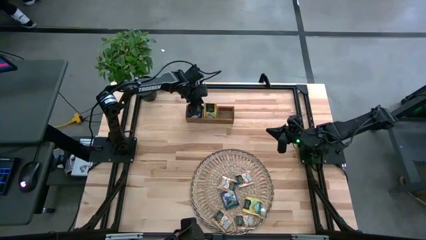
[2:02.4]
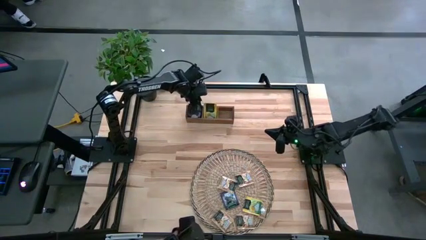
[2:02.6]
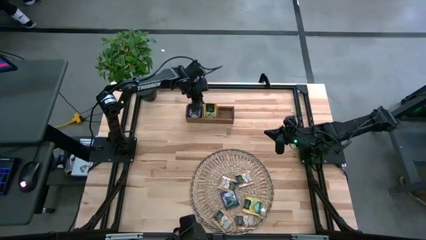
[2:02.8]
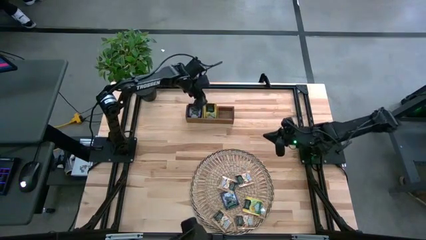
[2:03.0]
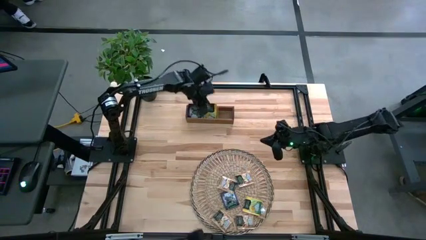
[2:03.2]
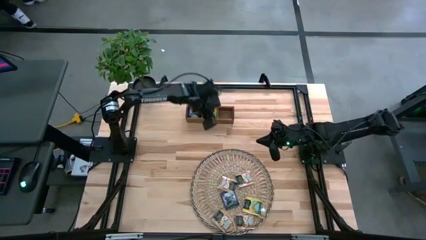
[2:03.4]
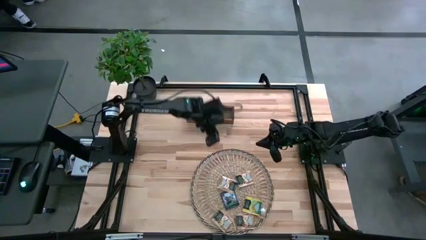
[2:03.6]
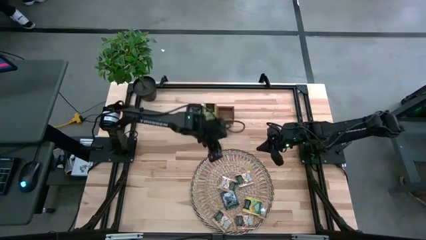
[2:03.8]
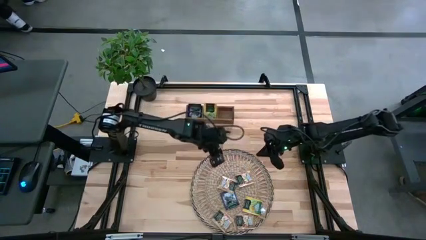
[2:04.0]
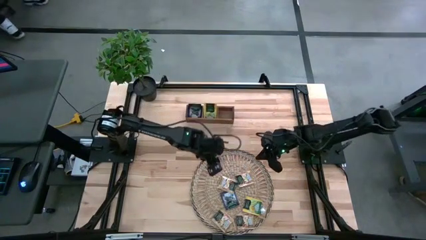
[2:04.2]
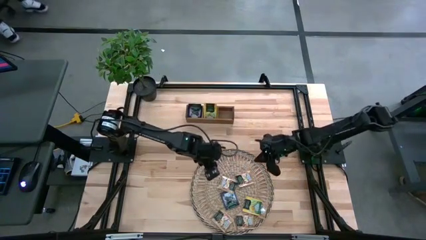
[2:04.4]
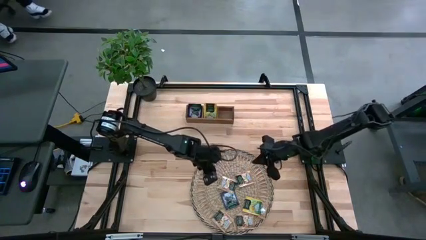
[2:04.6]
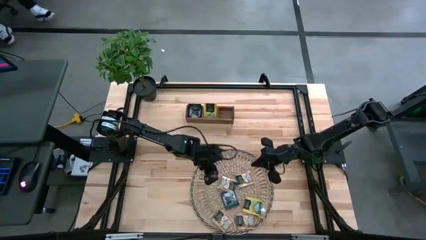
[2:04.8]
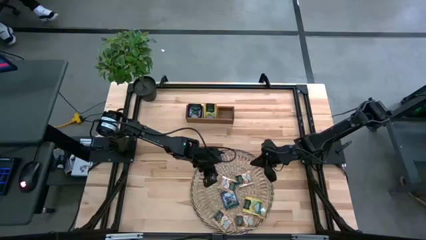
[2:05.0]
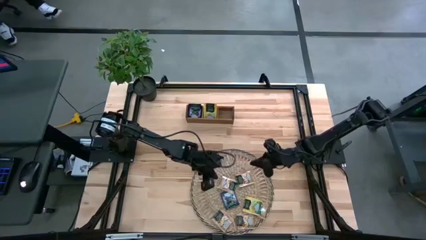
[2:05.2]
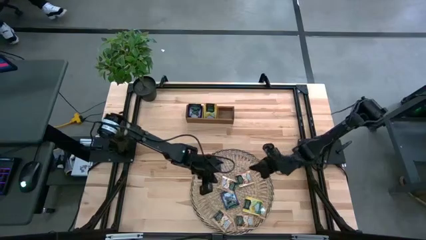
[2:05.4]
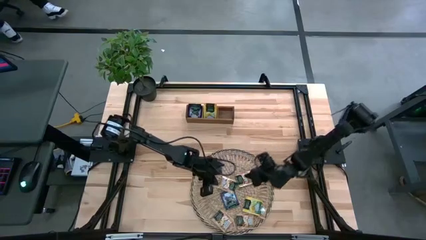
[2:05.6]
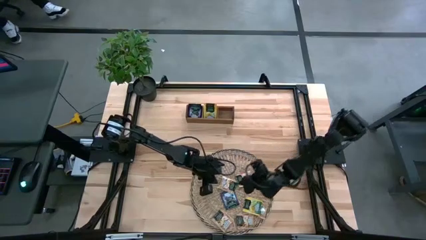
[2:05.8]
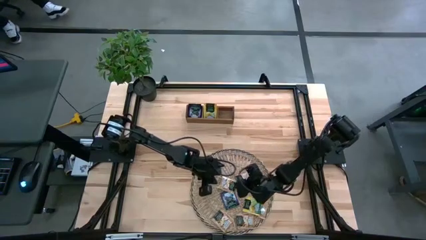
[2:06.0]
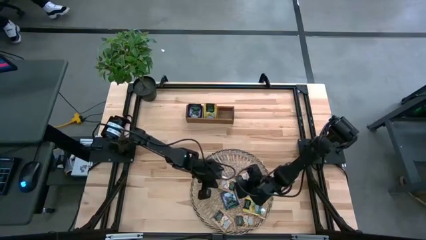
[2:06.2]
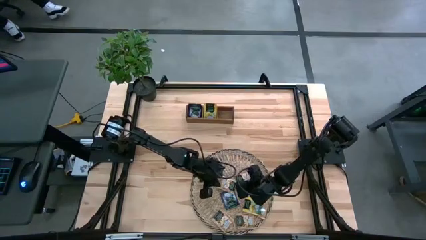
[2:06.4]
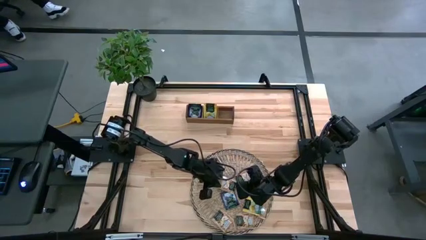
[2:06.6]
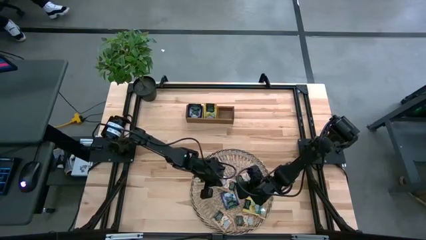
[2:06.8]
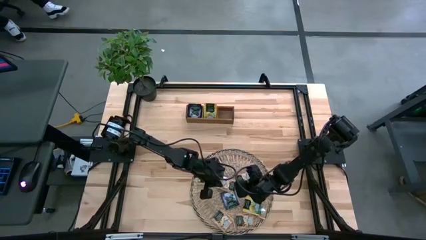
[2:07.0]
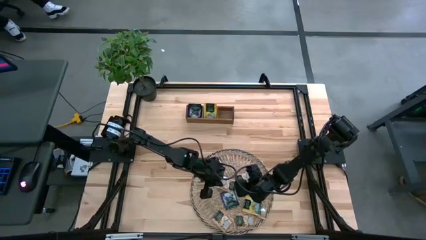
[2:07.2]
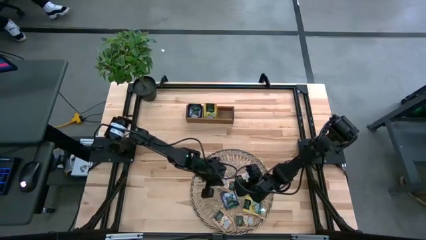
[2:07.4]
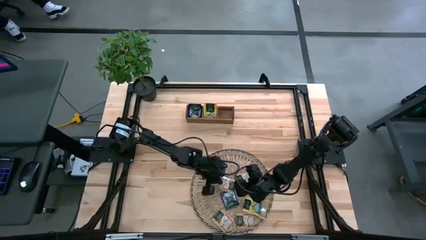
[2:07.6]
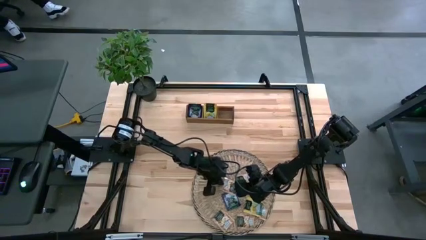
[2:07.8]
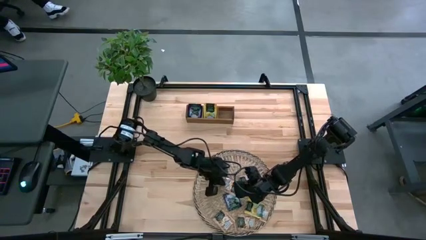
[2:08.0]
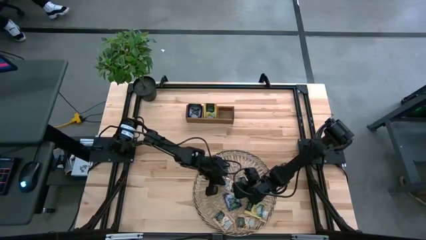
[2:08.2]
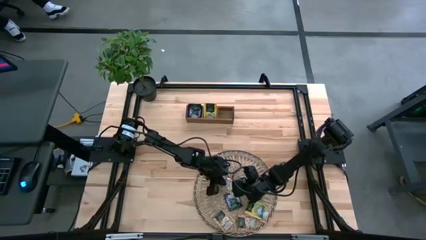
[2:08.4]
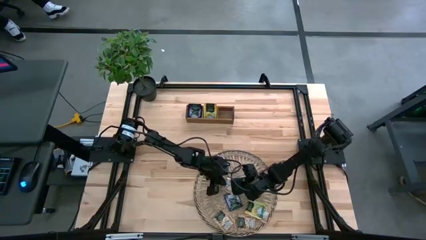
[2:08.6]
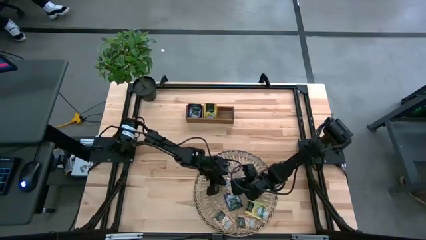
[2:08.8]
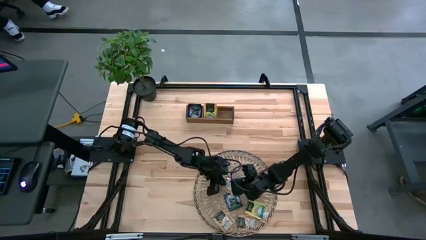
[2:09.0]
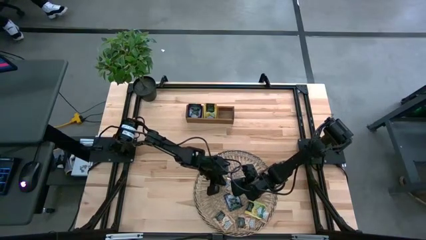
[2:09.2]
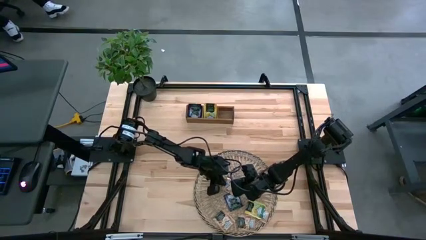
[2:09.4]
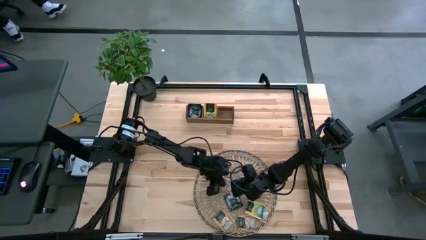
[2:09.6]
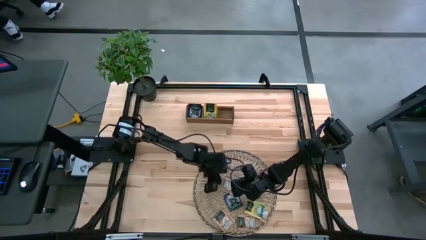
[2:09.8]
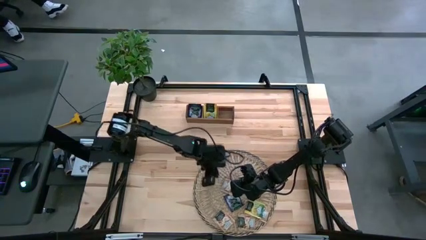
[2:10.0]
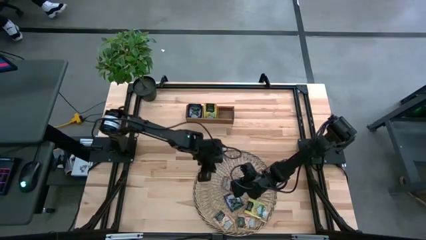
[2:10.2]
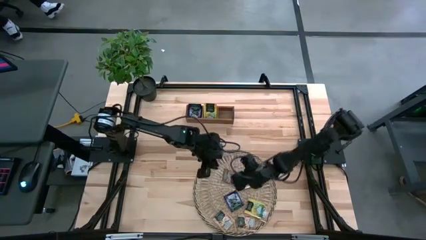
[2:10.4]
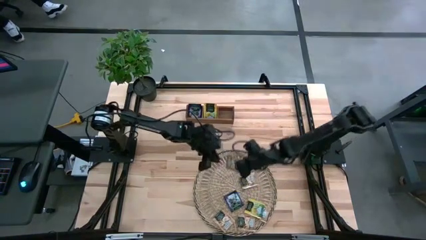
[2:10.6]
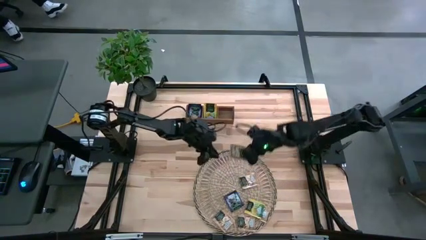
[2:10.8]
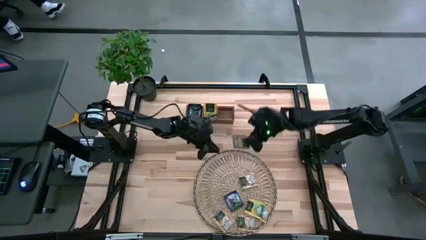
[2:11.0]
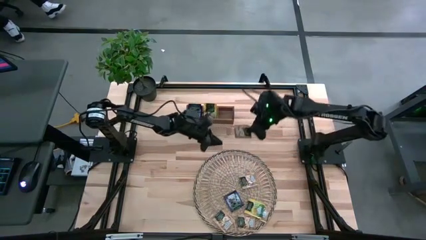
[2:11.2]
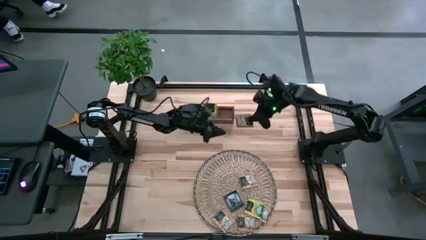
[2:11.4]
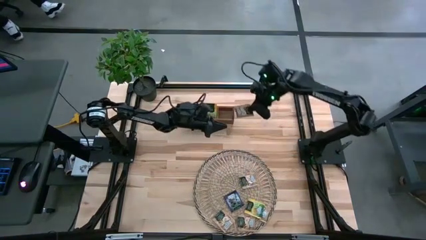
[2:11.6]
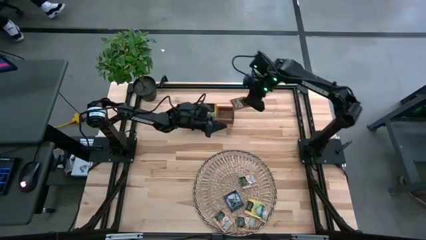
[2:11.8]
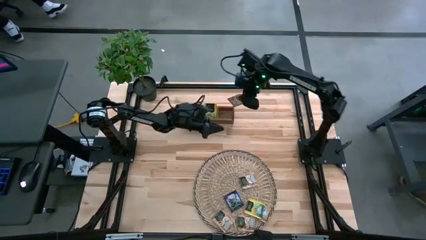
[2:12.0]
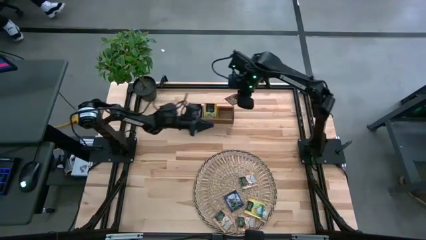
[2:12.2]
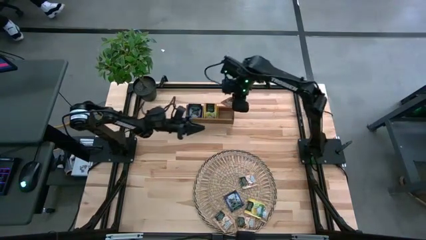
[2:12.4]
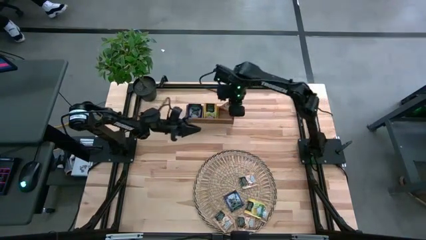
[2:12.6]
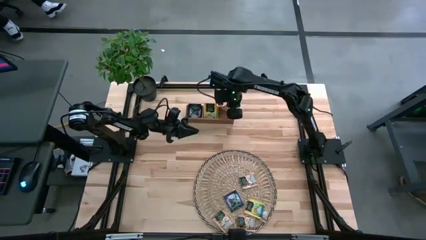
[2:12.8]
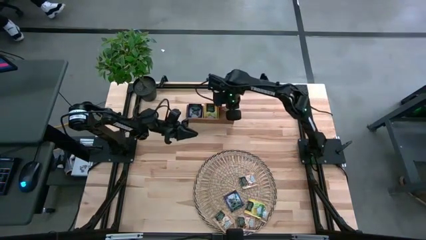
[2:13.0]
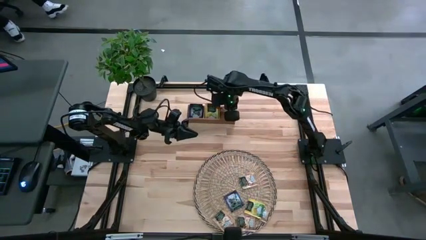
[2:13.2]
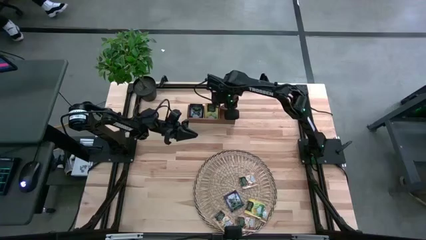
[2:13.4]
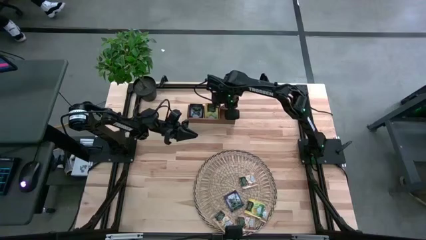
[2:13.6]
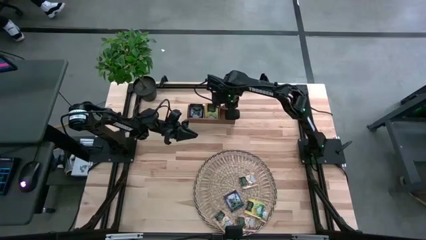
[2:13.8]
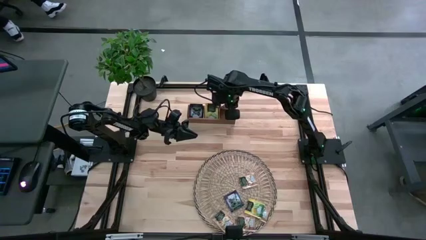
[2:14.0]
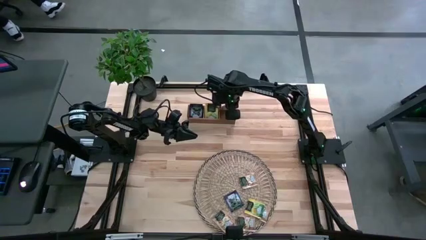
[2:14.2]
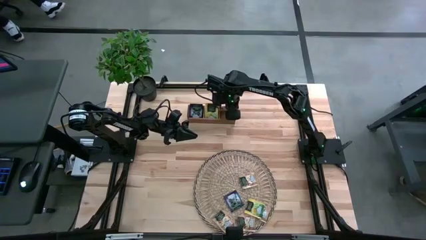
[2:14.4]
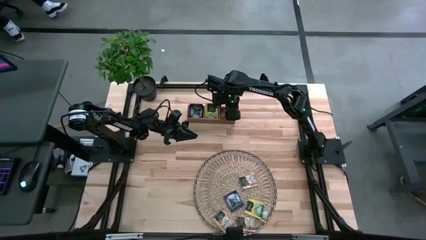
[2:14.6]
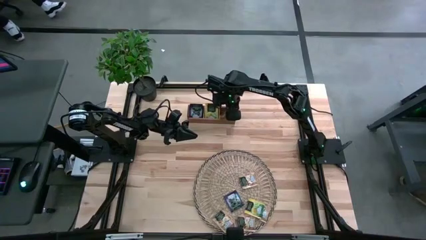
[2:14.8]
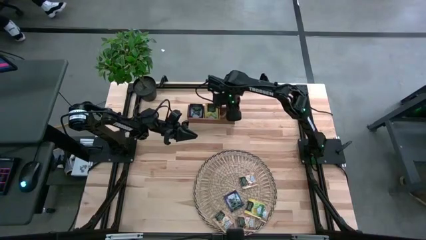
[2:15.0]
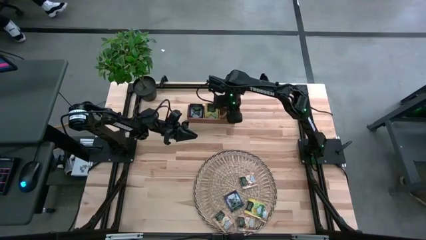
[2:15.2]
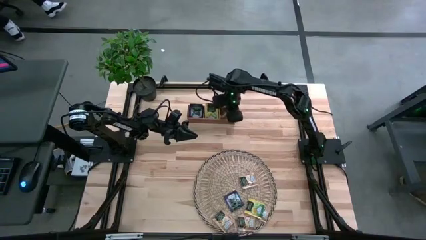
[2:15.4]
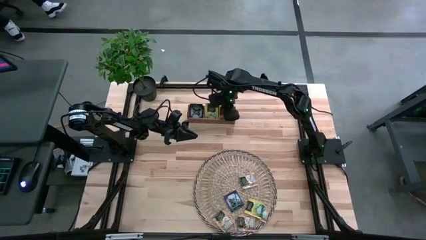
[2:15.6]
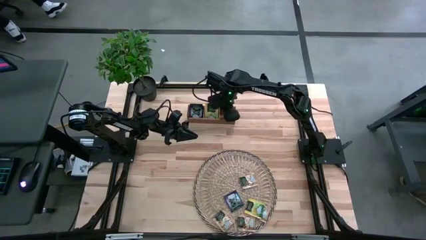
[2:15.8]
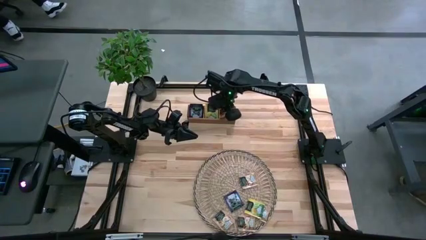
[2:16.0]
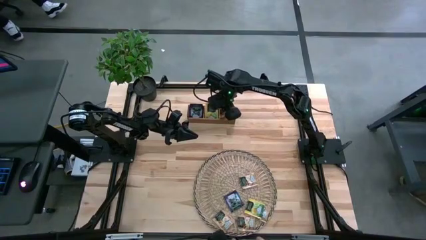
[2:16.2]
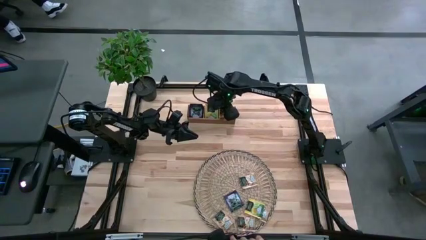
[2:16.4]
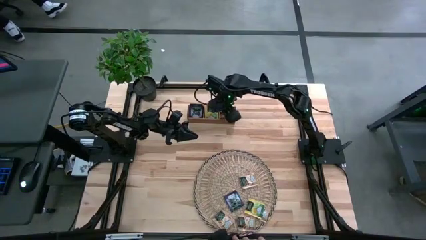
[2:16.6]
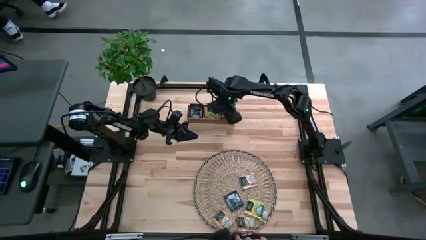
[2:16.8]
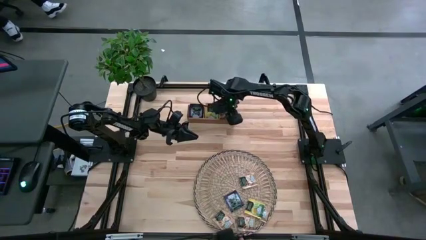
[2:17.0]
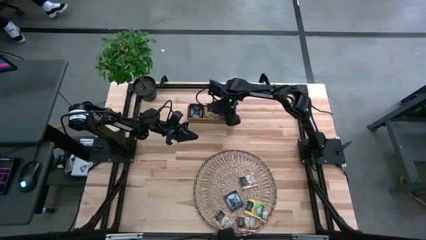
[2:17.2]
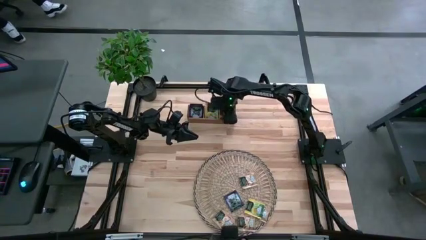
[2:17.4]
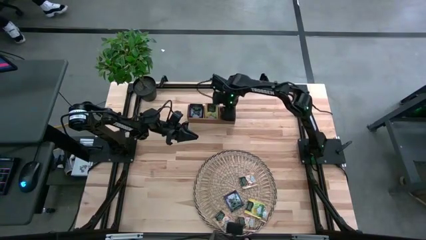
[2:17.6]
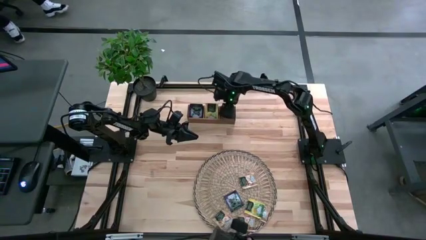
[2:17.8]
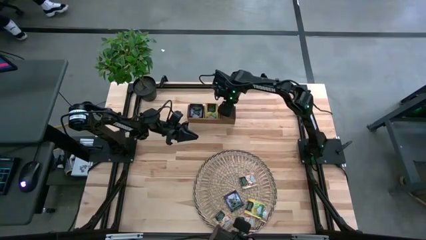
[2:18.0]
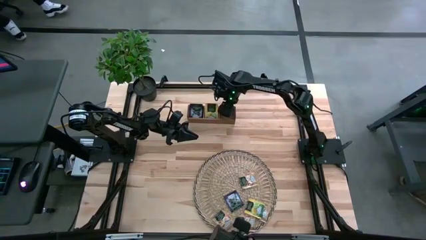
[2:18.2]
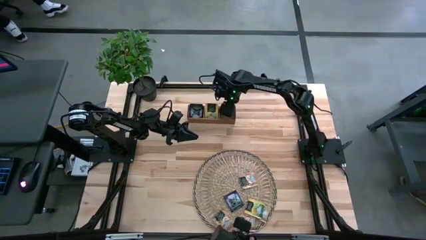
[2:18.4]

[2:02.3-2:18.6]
Task: Pick & Place Tea
Put the brown tea bag in the right section of the wooden organizer

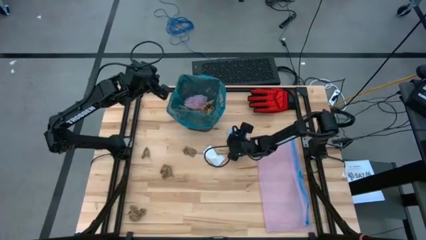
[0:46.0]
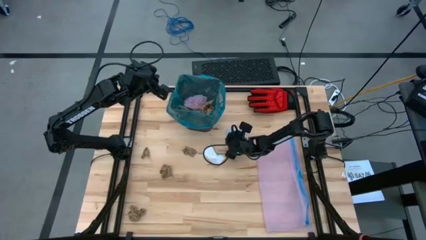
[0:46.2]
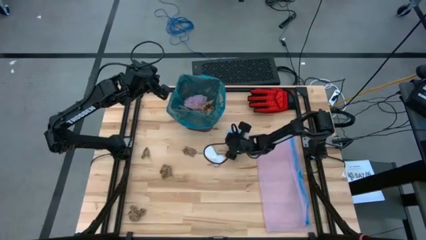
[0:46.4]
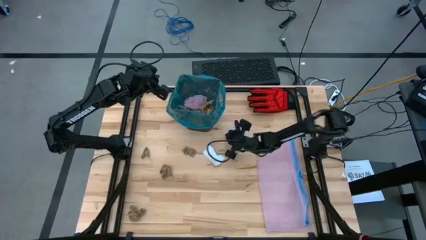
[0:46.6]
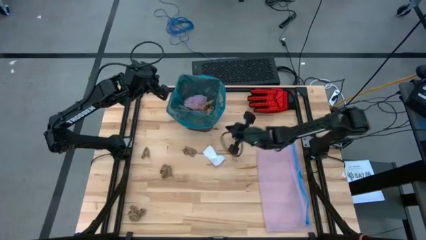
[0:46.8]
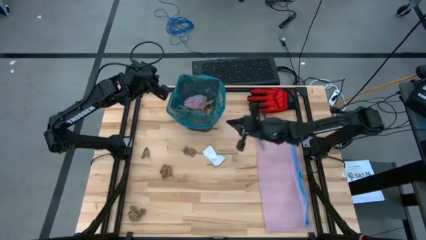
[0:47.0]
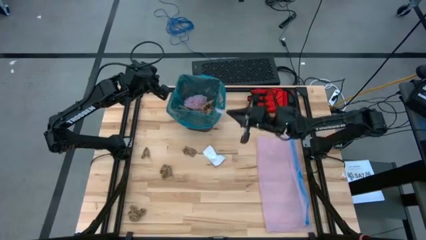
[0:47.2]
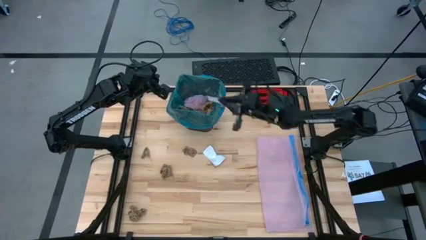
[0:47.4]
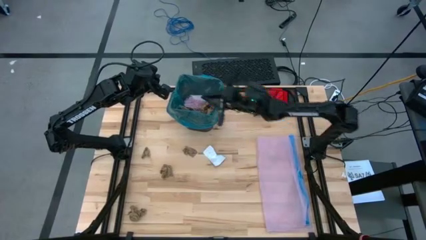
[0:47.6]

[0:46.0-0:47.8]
Task: place trash/remove bag and relplace
Put the blue paper into the trash bin
